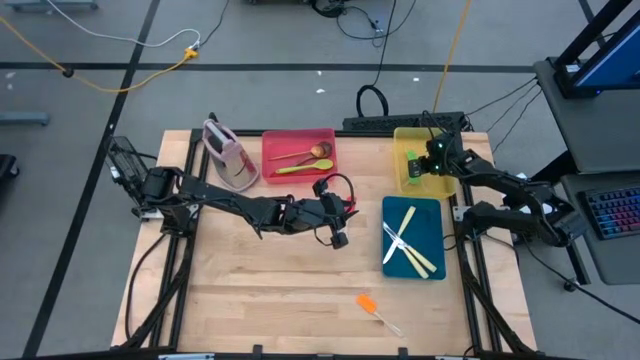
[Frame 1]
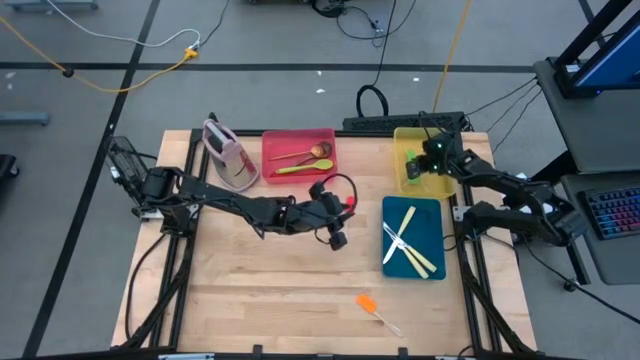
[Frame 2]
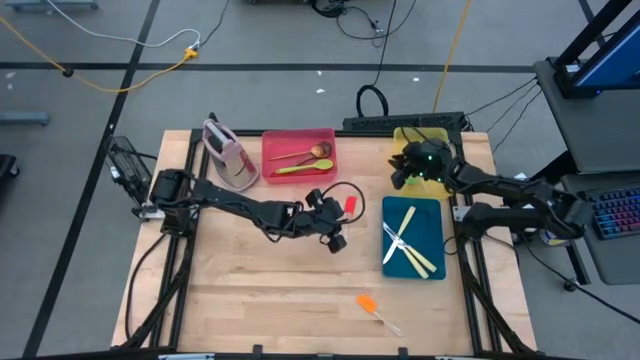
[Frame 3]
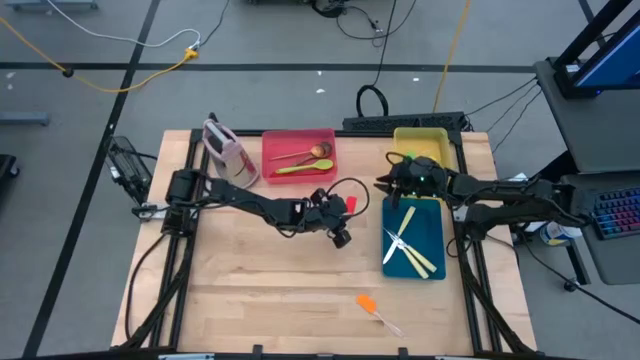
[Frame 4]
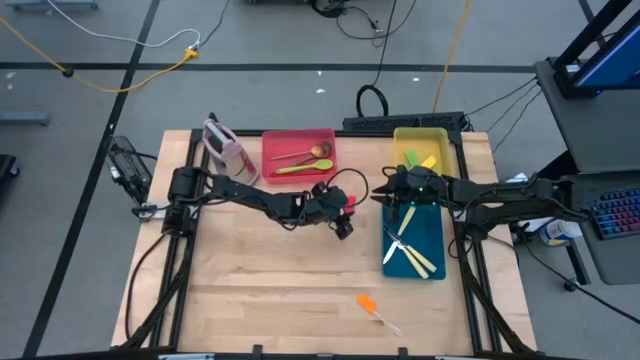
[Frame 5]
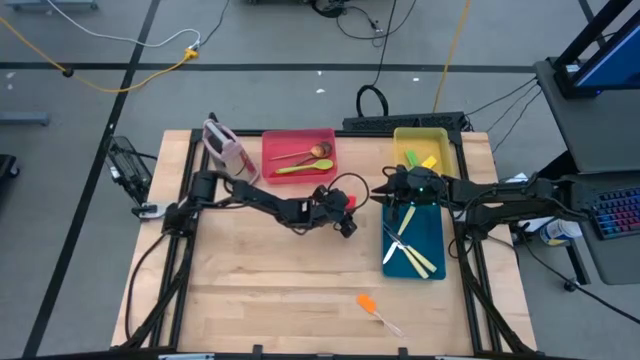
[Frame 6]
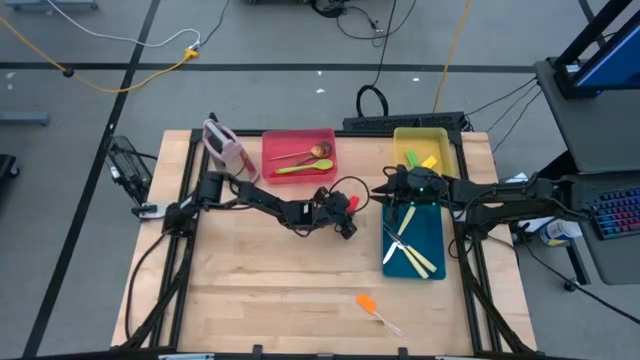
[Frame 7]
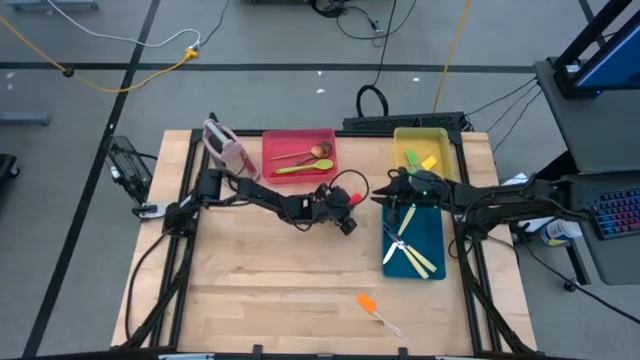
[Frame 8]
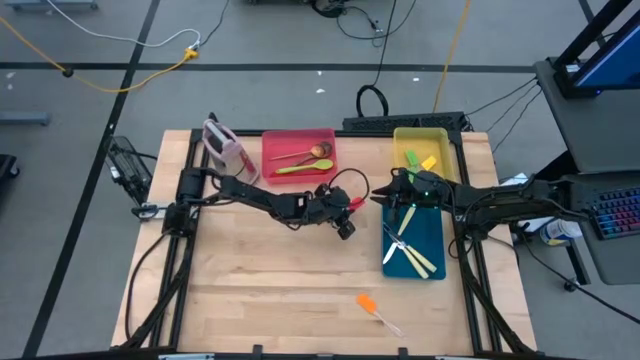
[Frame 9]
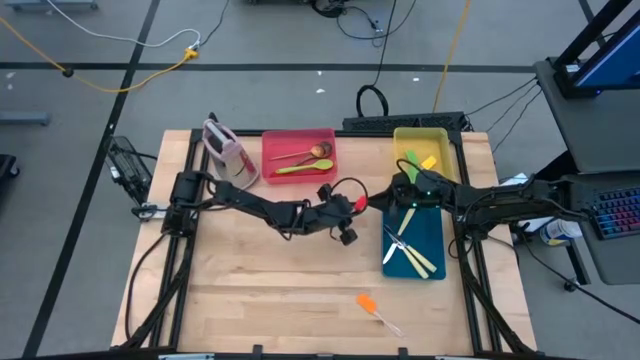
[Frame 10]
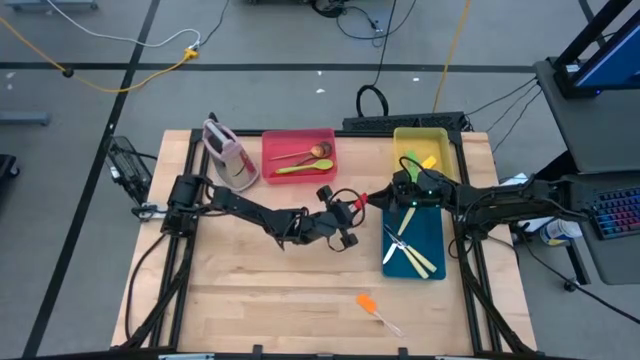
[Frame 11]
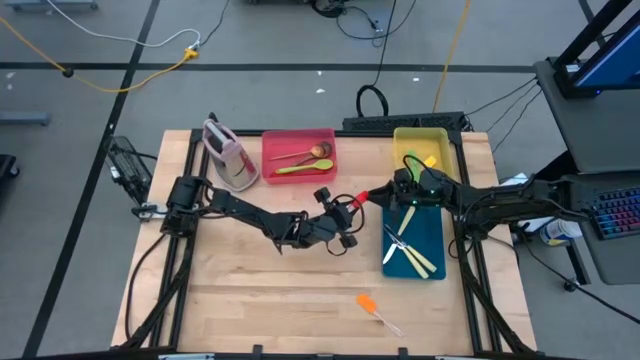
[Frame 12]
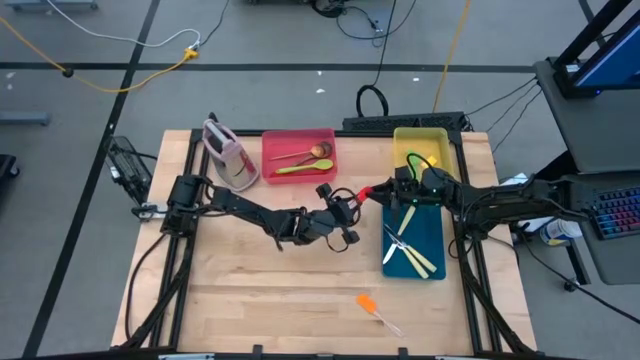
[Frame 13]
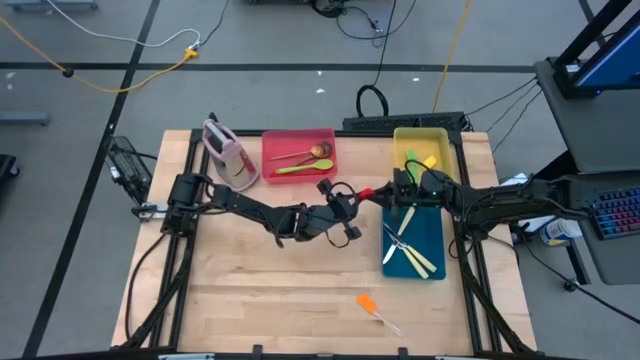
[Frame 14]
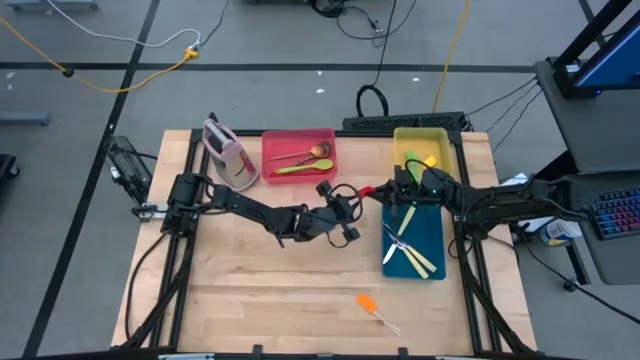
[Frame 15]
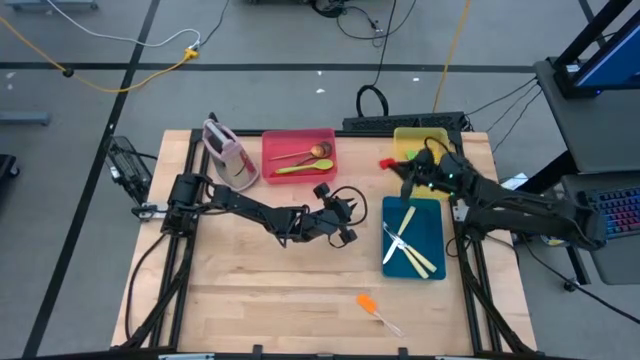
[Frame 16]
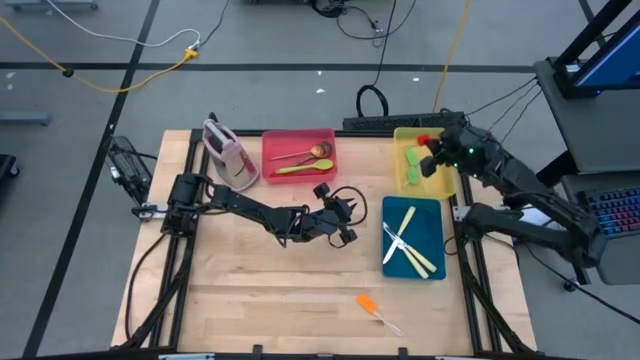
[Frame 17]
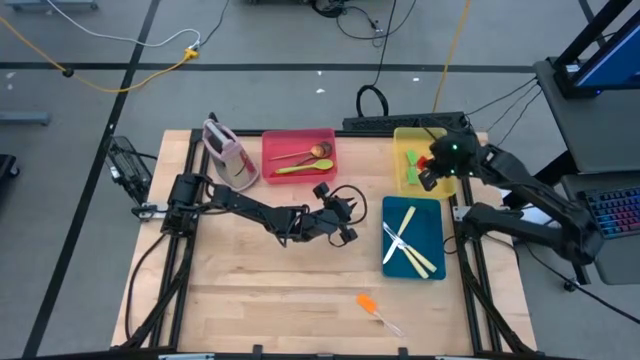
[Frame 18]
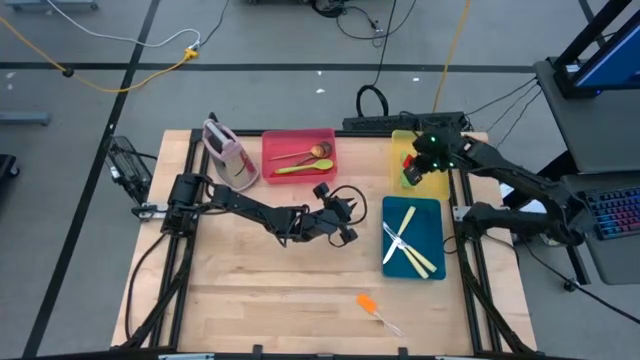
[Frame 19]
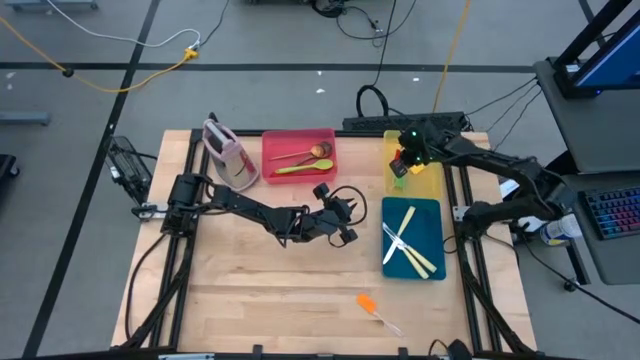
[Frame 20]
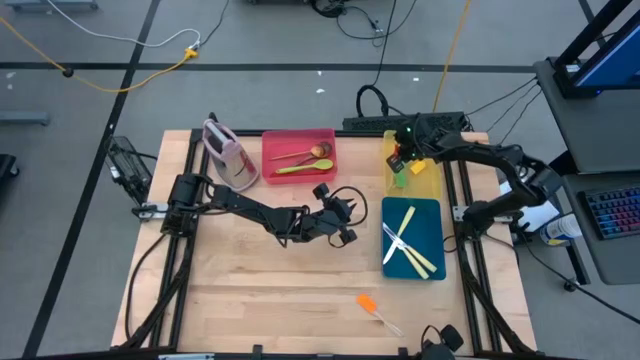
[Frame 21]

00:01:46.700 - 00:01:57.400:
Task: Pick & Place Kitchen Items
Put the red spatula into the yellow bin

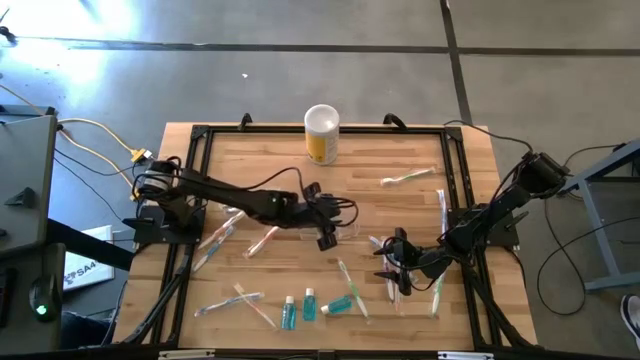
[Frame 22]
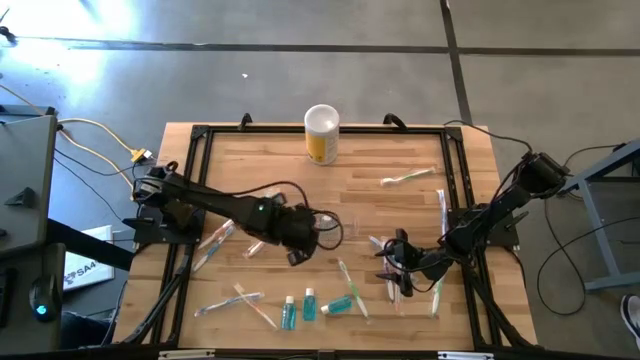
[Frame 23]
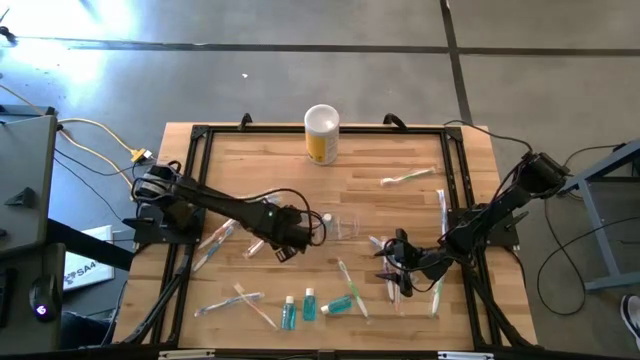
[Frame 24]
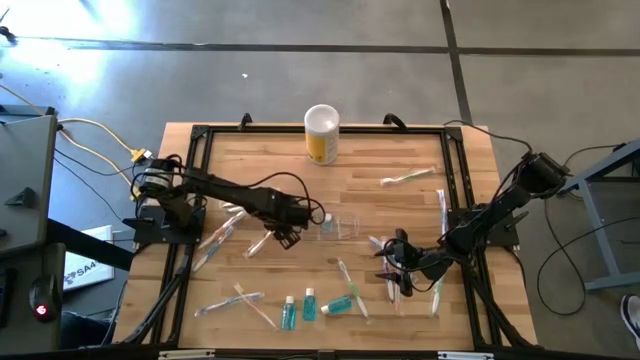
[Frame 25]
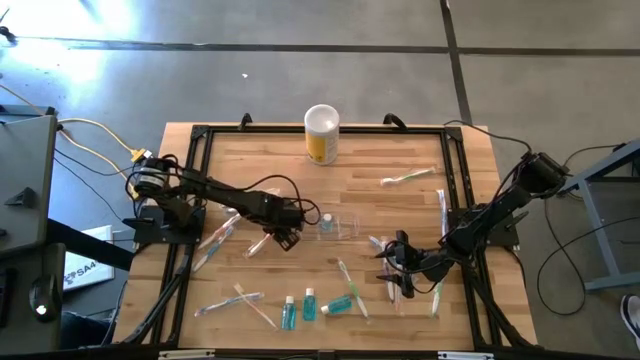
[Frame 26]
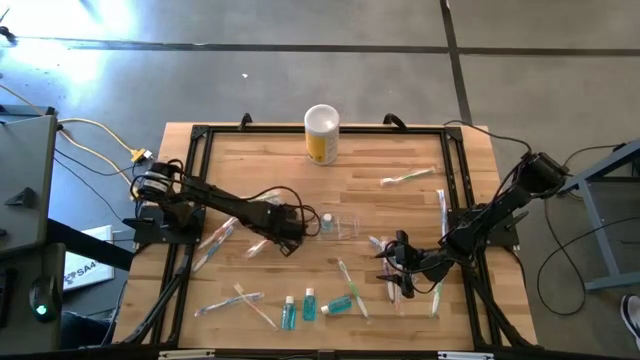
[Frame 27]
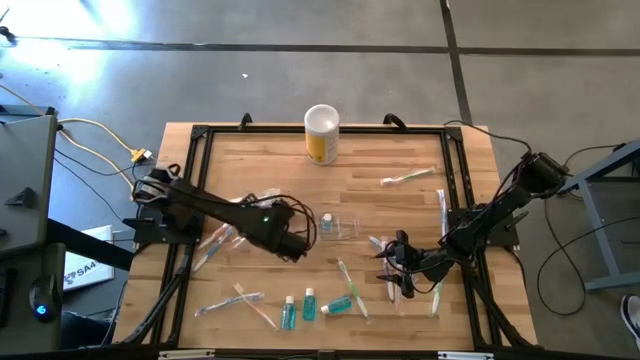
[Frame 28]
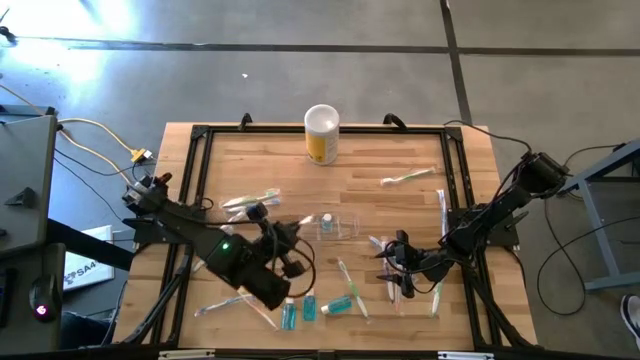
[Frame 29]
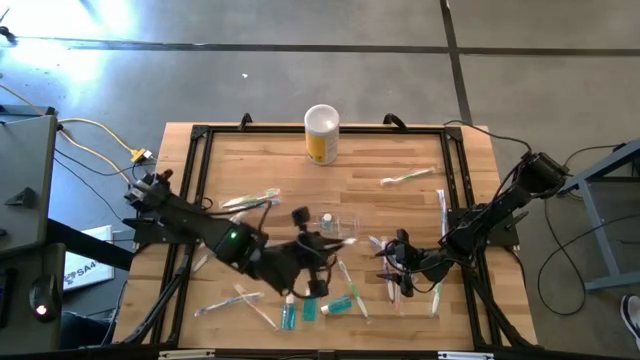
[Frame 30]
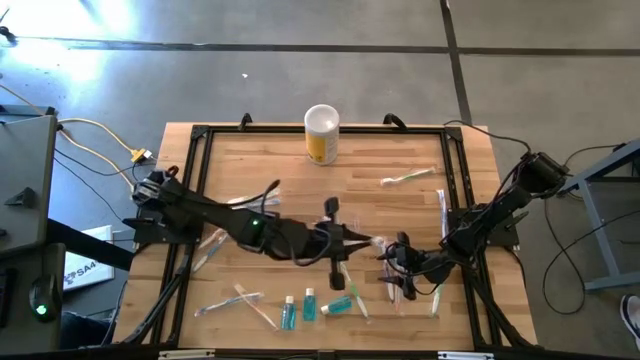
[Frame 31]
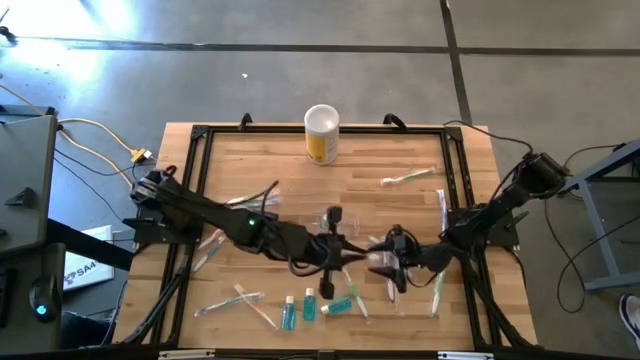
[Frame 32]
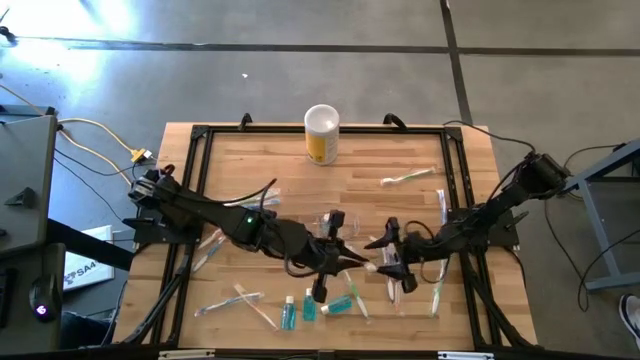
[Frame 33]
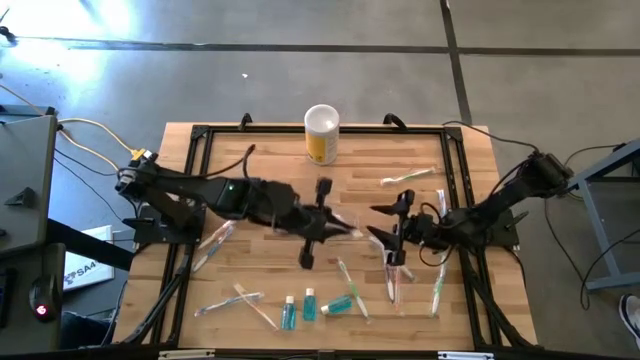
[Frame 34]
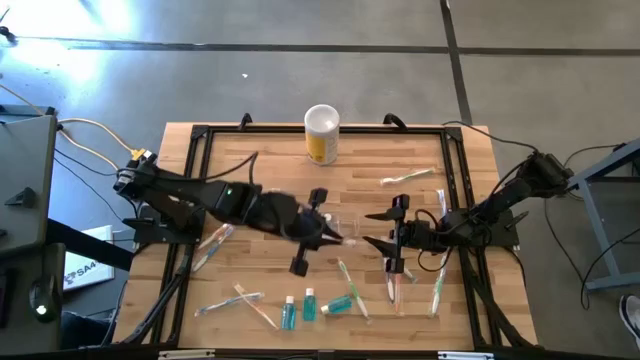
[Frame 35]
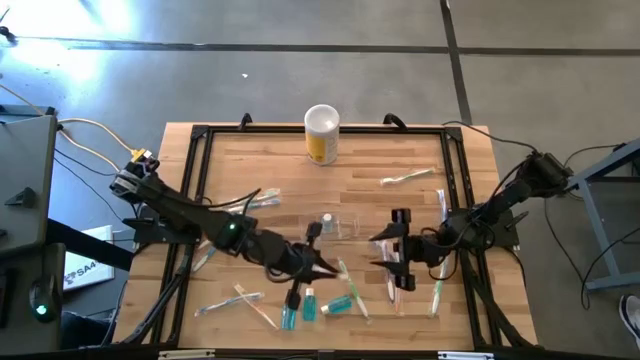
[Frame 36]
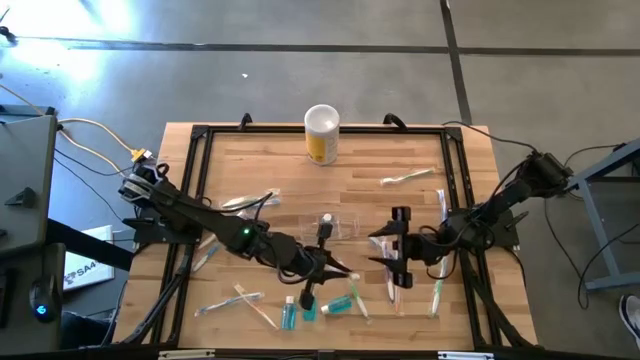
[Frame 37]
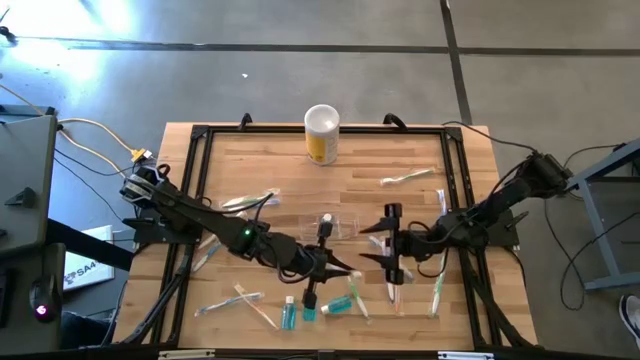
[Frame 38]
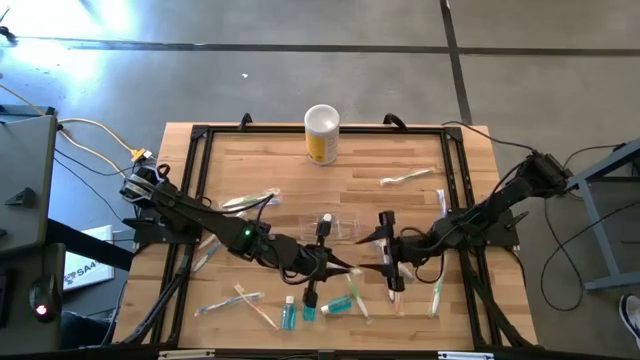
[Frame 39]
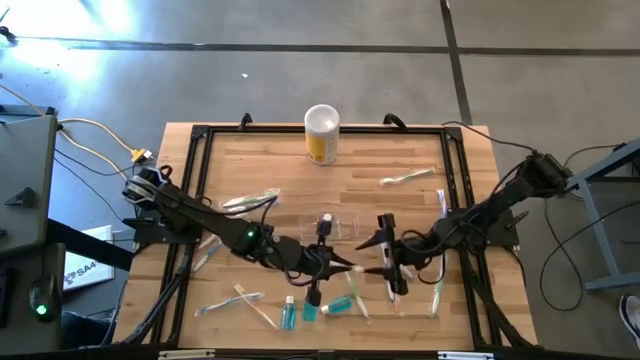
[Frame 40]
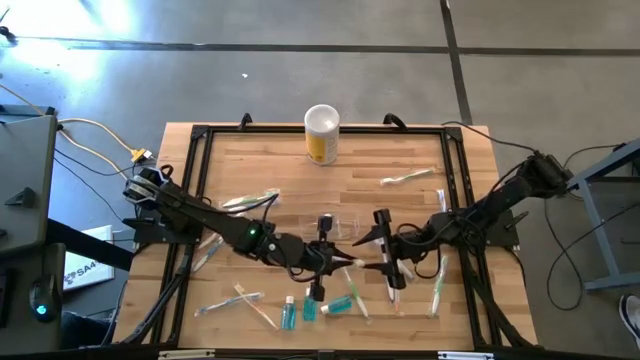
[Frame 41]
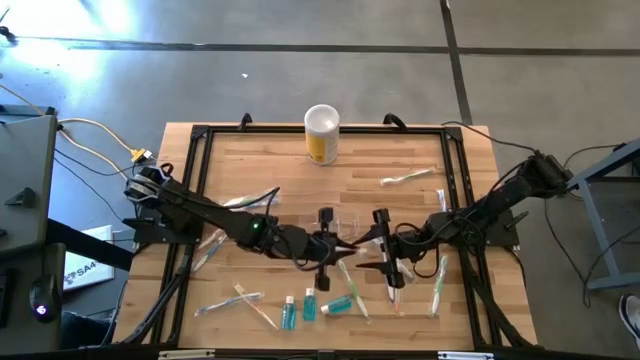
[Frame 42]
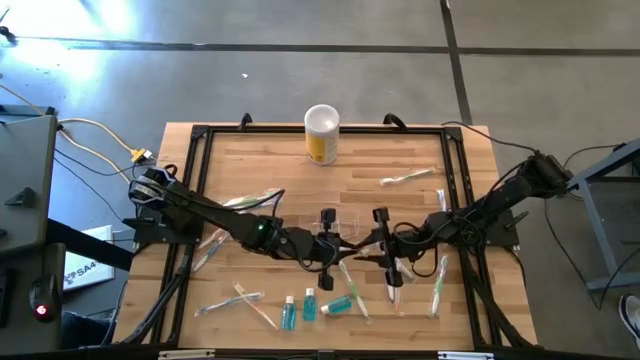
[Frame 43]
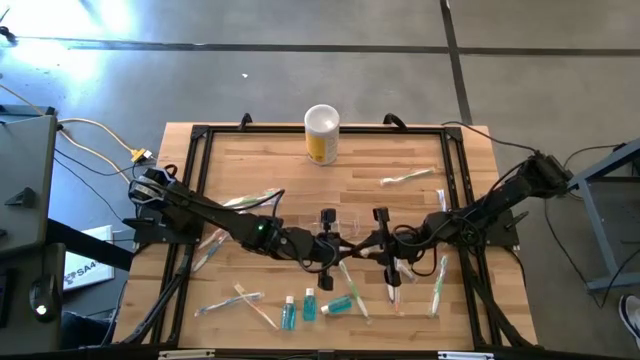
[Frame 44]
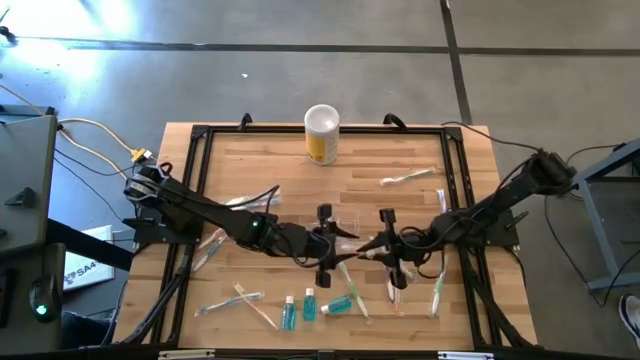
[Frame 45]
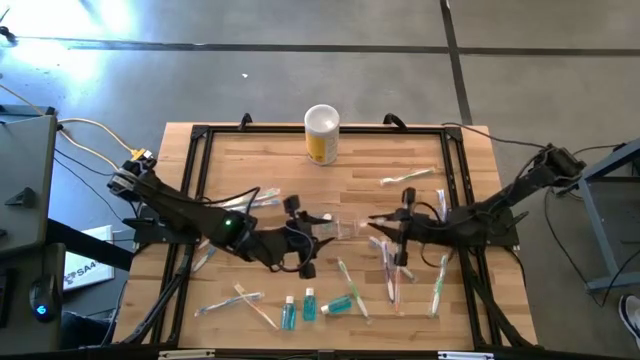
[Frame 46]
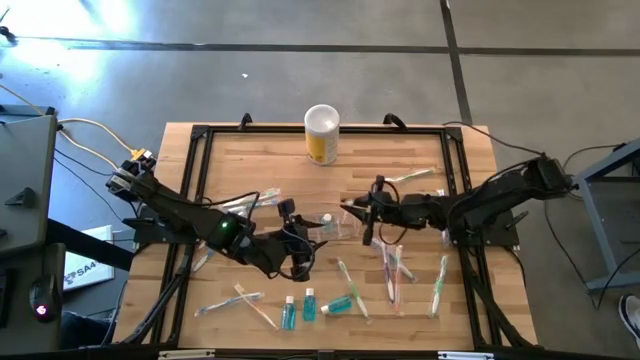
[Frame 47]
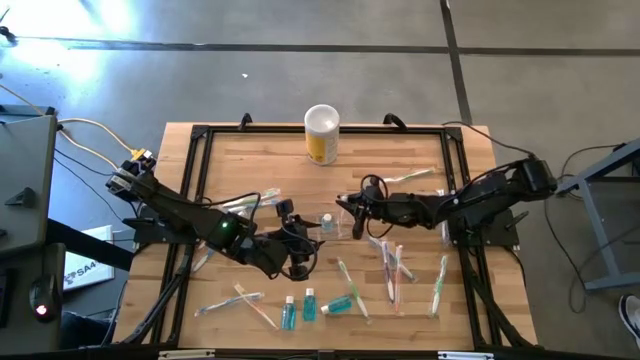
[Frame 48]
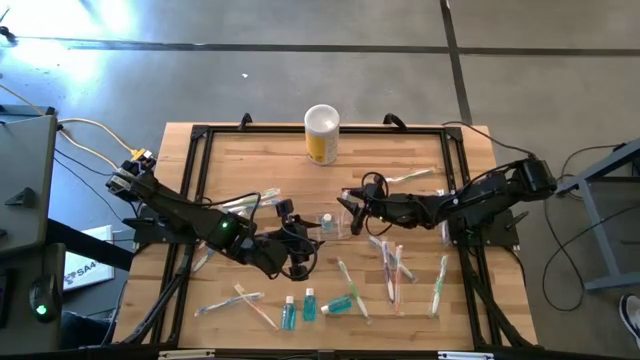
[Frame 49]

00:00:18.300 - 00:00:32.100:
Task: Pick & Place toothbrushing station
Put the orange toothbrush into the right part of the transparent organizer
